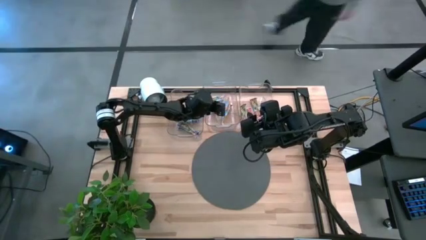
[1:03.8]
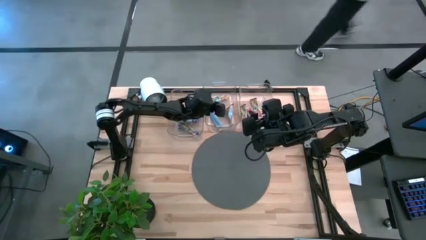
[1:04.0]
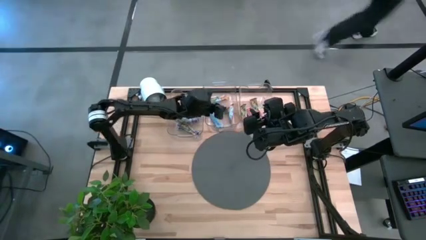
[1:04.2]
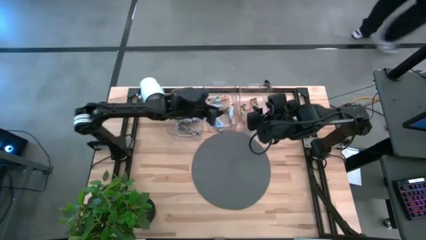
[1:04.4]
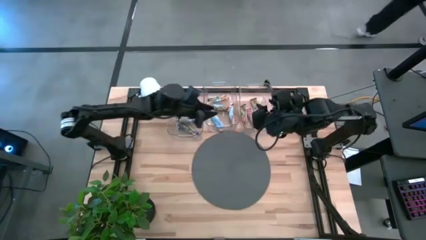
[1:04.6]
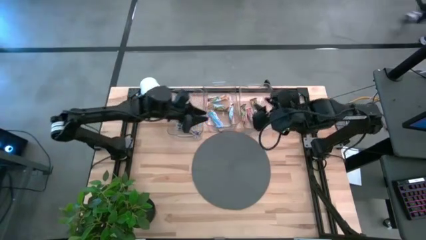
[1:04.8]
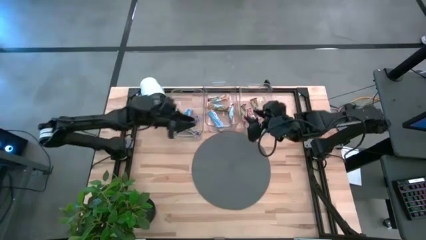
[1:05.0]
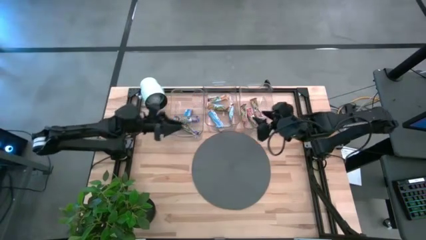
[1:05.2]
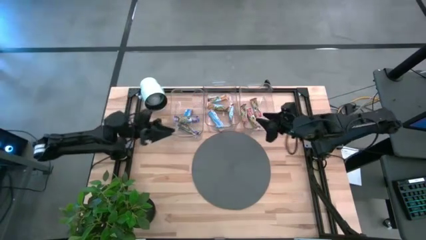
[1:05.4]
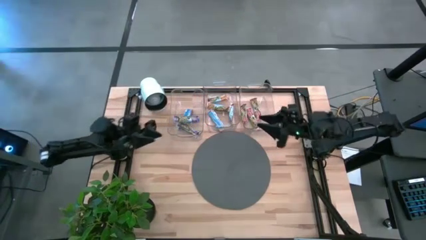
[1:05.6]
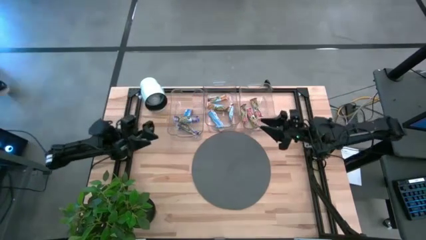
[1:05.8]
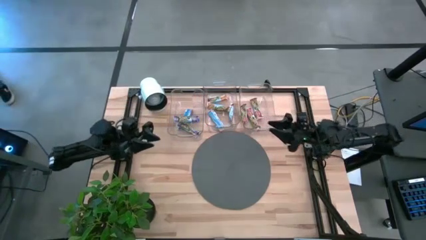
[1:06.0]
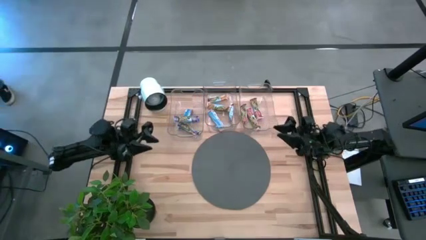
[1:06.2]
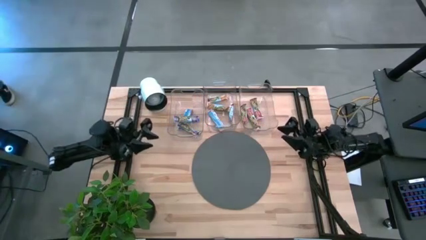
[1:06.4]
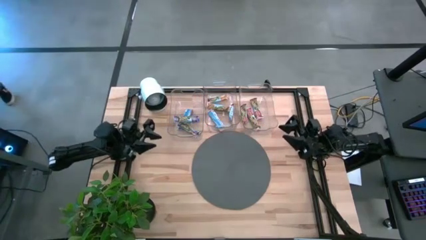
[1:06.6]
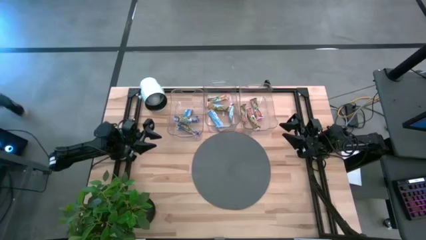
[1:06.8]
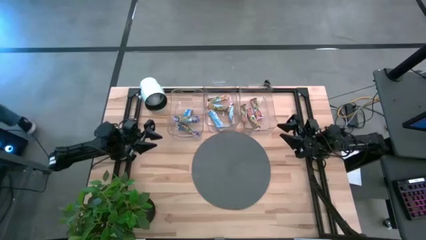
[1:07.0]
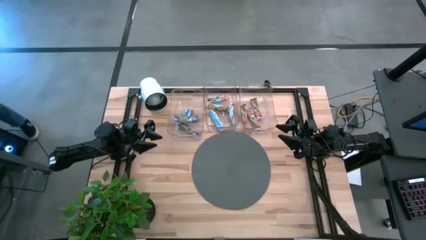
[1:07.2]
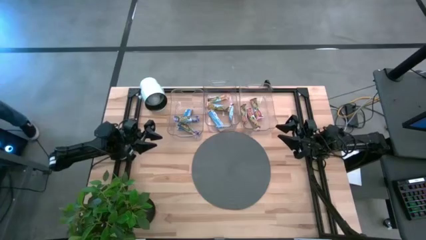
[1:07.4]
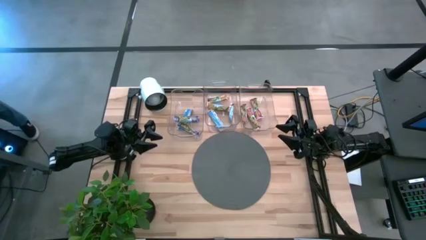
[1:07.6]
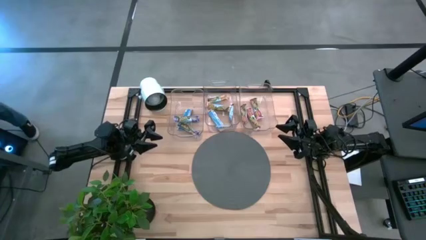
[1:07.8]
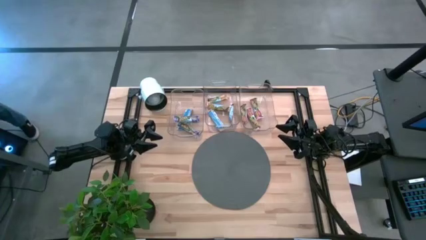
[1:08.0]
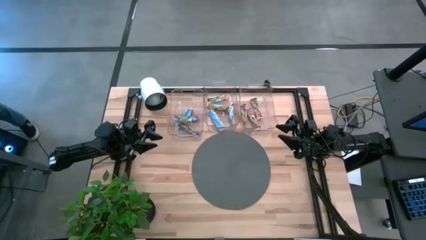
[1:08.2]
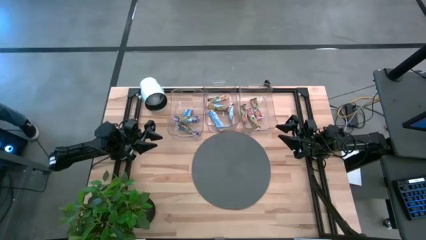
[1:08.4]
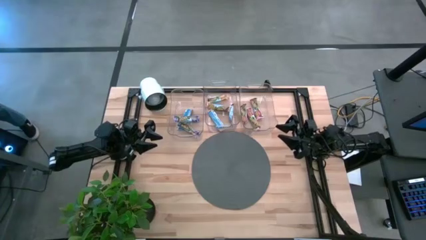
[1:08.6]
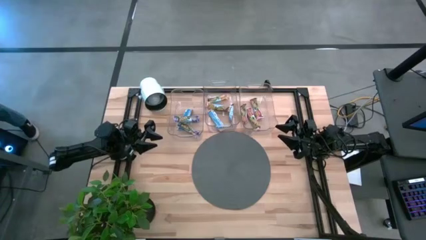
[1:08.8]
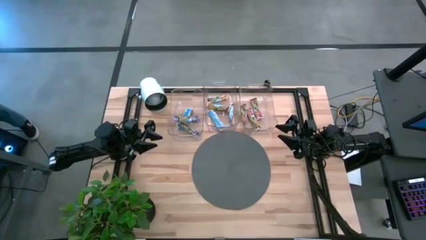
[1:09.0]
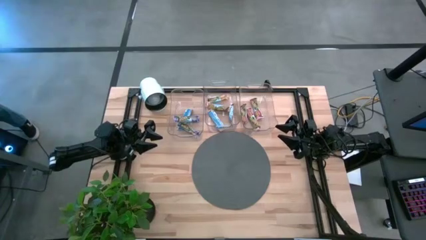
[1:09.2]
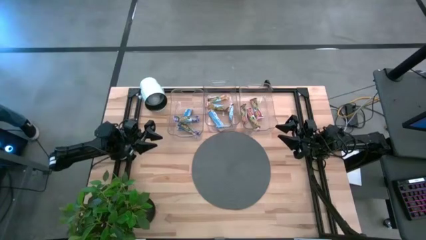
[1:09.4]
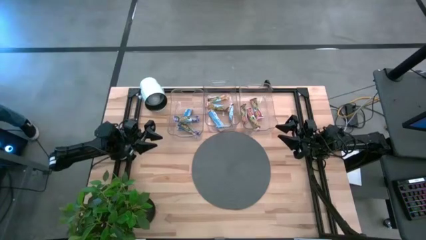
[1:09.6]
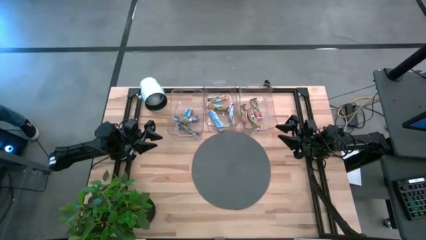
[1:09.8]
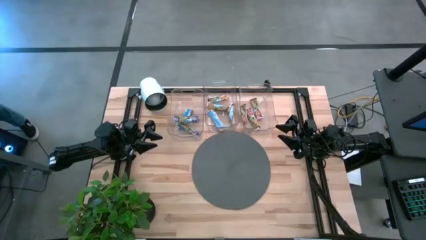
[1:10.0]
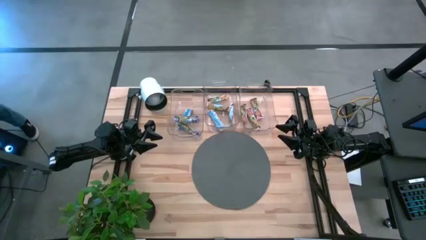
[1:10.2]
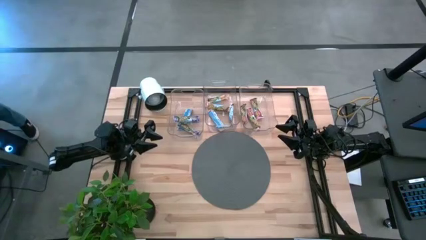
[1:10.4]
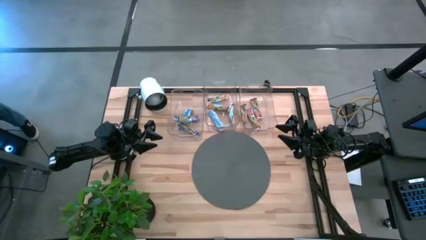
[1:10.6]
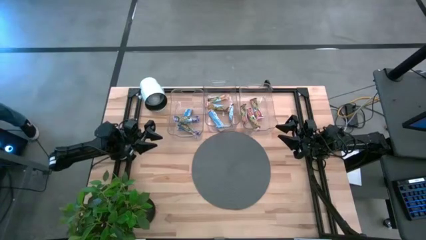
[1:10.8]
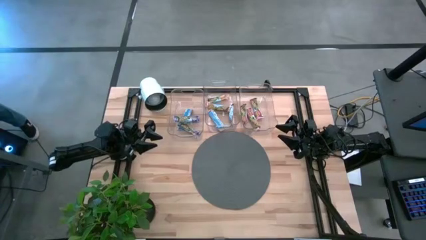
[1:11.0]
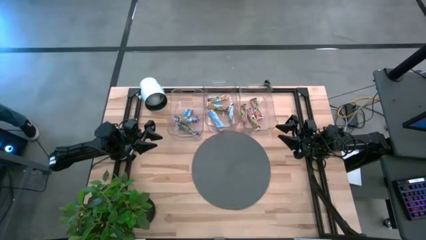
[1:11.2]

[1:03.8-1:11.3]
Task: Pick and place Granola Bars by type
Return to Home Position

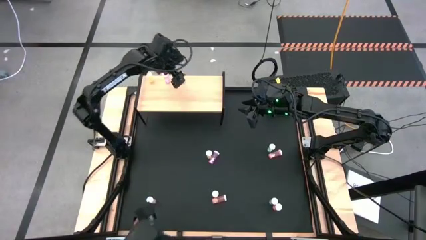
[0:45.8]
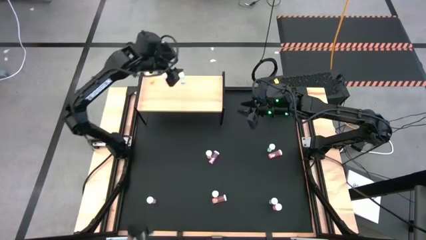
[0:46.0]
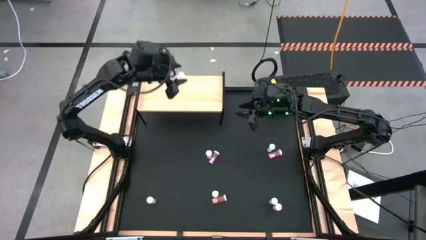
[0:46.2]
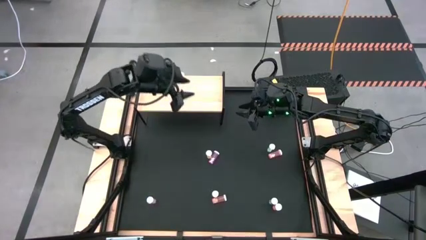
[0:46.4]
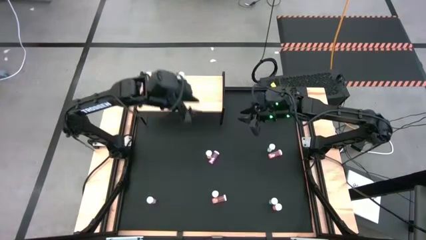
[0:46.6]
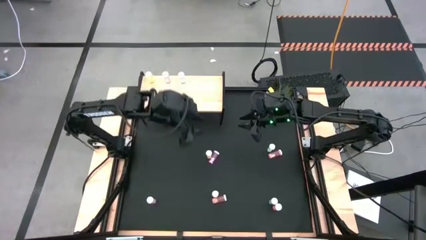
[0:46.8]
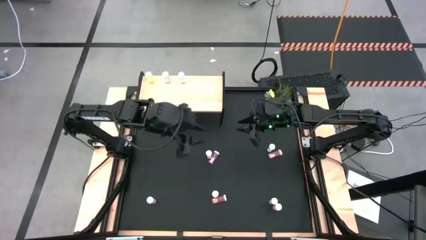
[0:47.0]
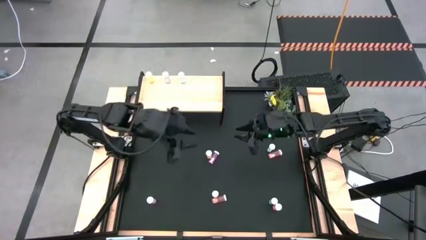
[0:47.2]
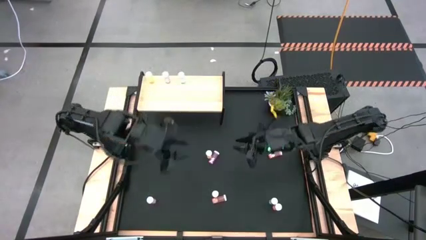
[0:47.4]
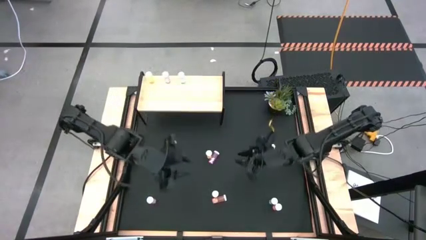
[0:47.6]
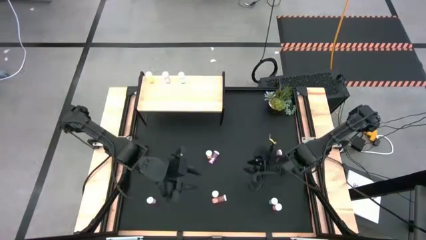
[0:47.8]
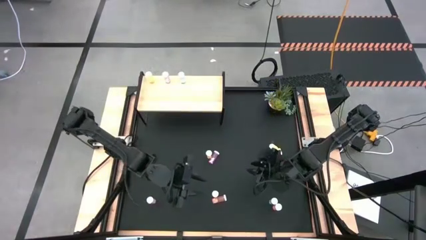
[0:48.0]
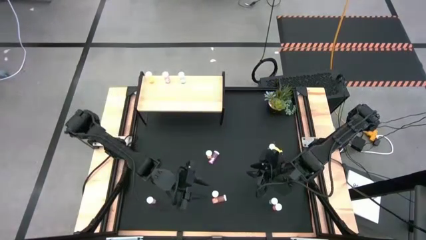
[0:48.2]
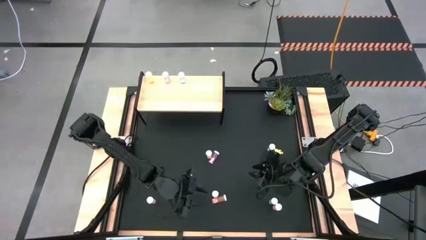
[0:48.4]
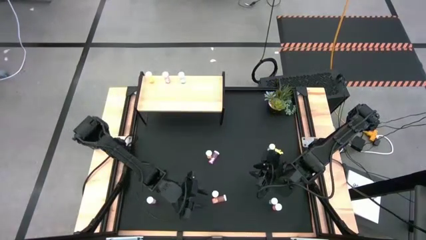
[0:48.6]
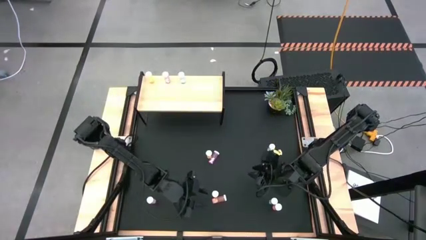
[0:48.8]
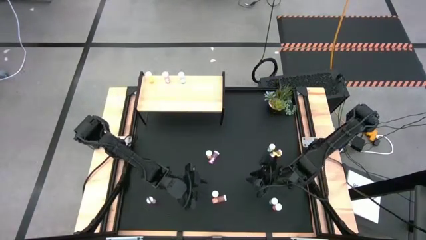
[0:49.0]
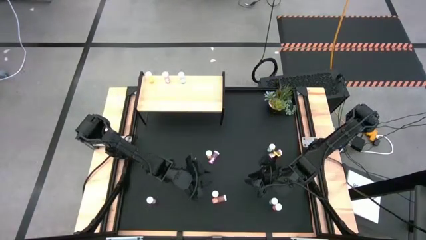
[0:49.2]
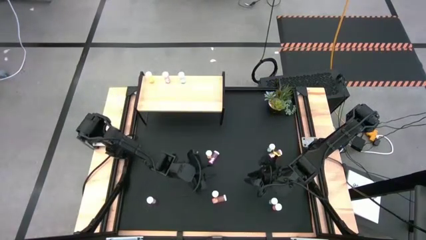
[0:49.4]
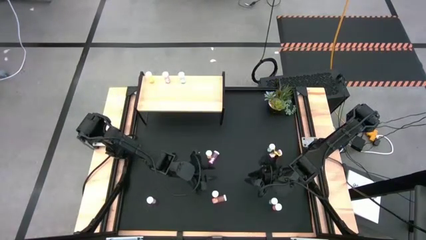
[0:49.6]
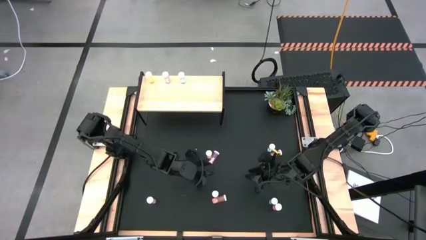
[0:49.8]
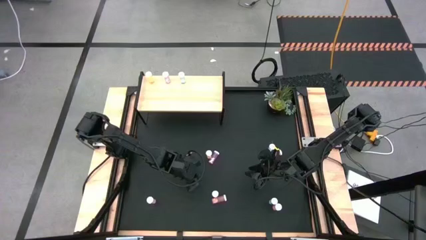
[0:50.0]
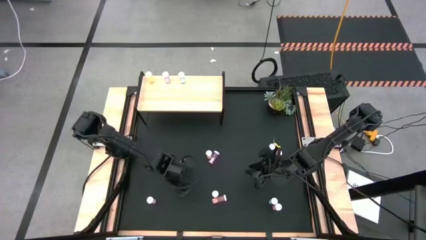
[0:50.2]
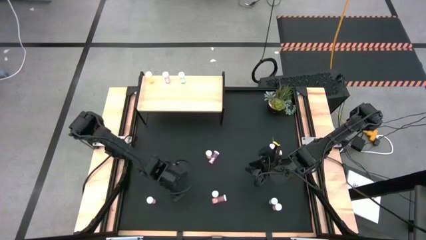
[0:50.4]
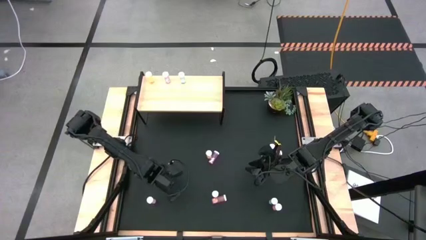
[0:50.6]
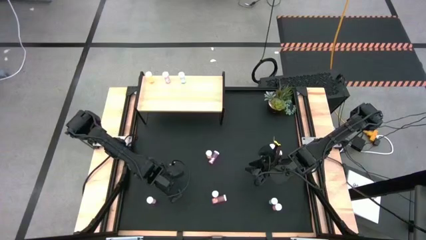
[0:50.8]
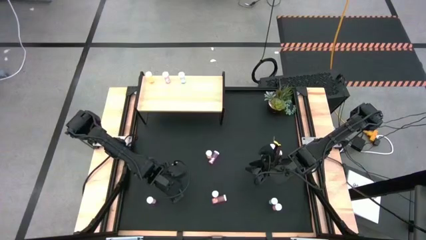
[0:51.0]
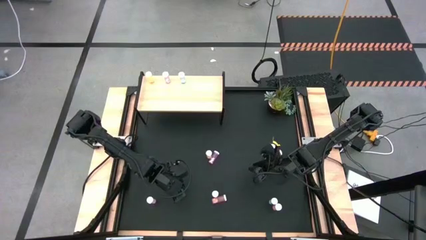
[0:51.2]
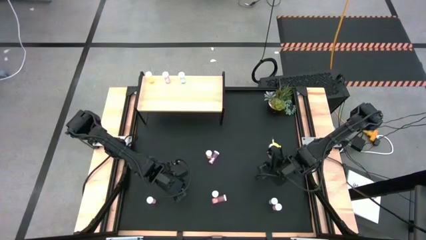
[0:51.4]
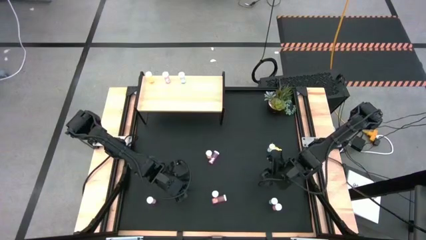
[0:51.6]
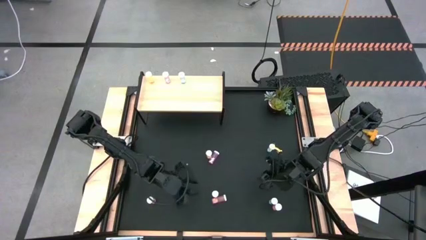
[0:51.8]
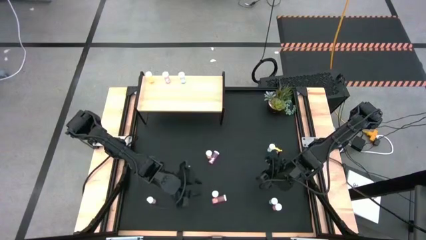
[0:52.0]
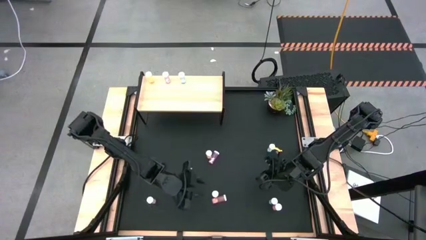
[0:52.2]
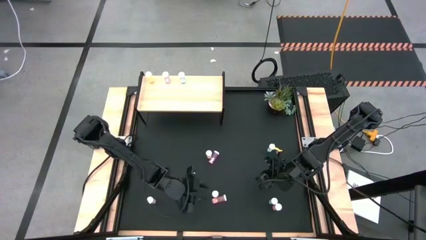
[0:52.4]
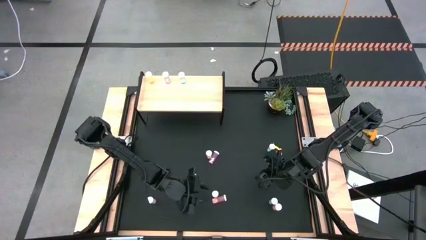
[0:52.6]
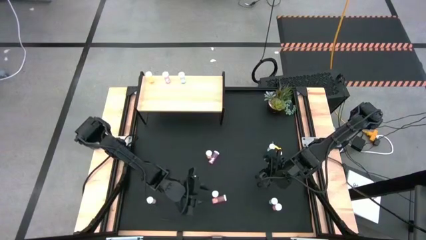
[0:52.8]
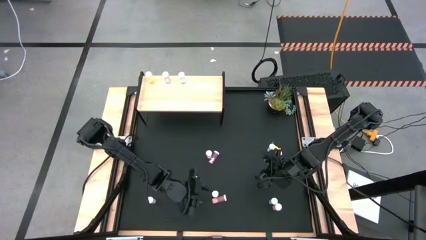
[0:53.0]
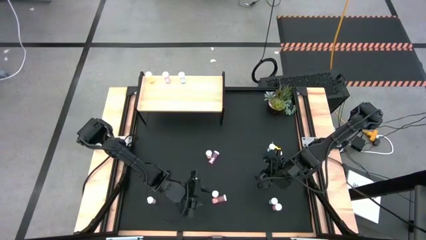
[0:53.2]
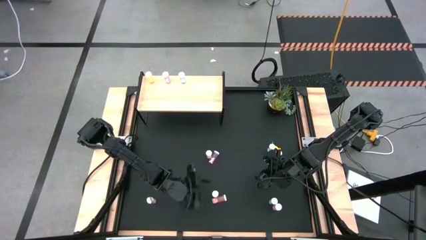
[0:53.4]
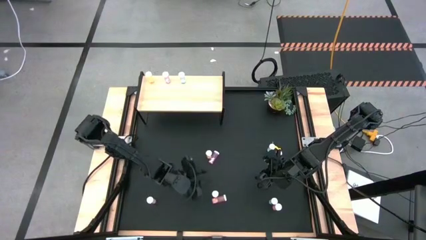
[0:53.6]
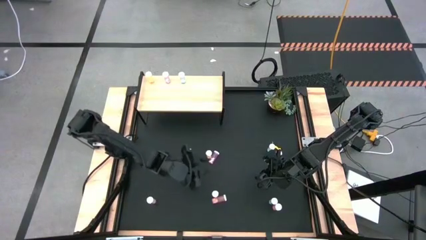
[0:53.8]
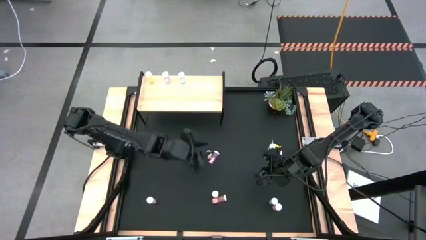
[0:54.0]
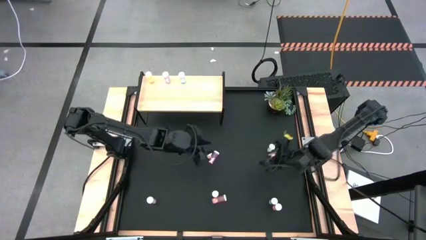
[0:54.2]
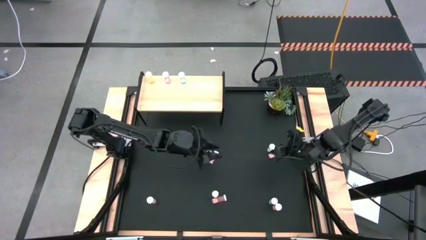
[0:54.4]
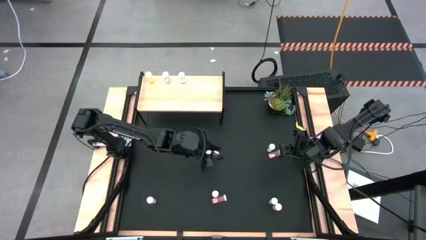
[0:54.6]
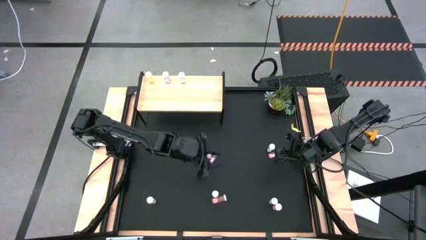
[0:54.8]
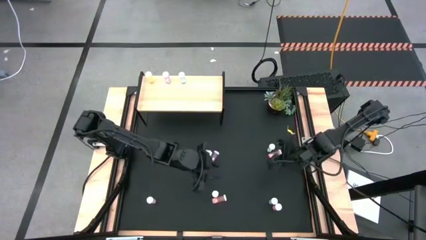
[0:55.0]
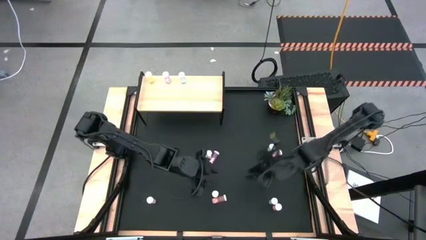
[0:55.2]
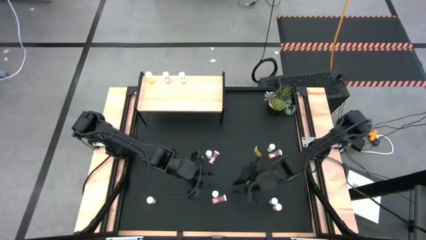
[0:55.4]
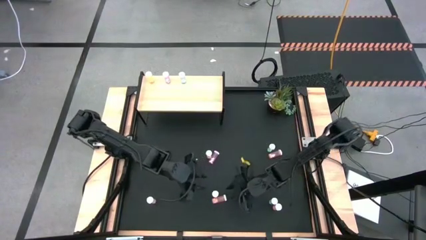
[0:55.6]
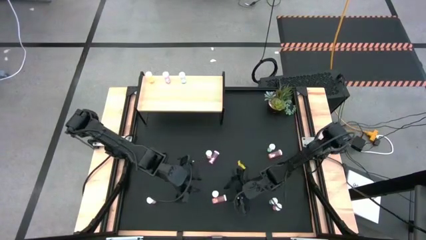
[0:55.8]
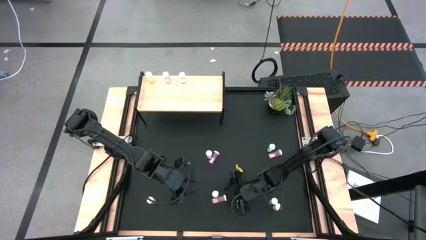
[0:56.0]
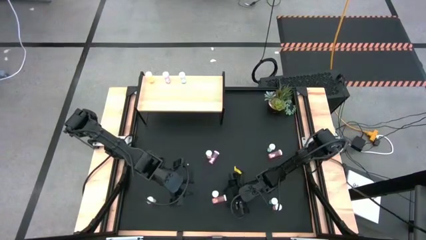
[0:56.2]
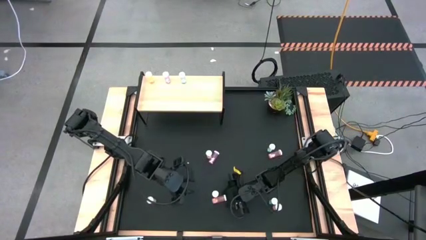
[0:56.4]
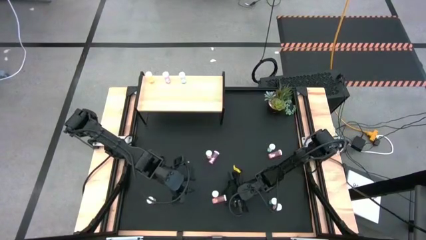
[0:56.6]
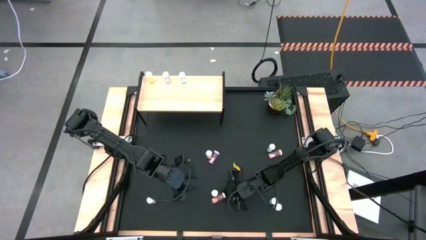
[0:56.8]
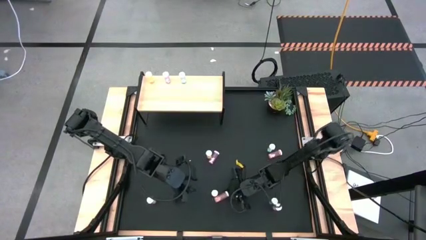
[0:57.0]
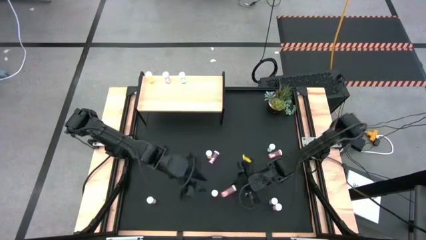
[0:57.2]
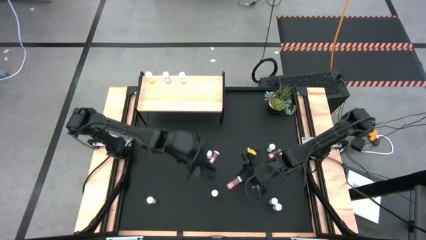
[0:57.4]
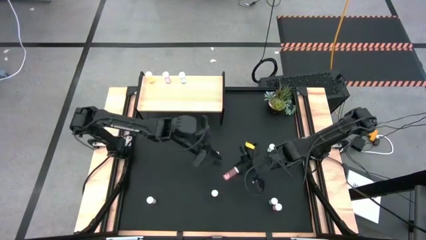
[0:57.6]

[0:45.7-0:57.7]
Task: Pick and place medicine bottles onto shelf by color
Put the bottom left orange medicine bottle on the shelf
